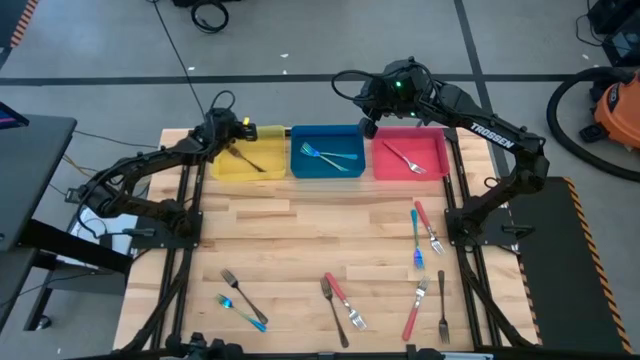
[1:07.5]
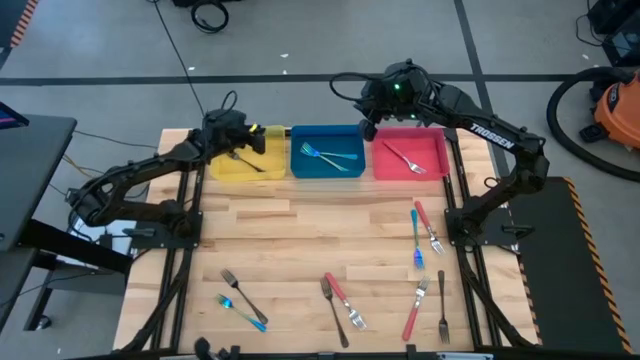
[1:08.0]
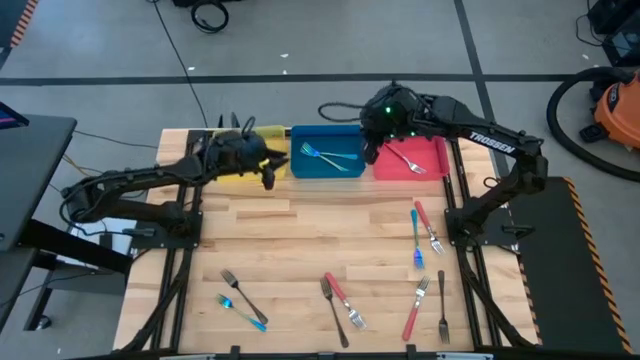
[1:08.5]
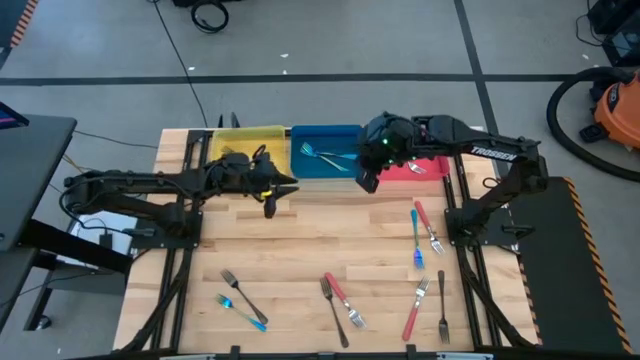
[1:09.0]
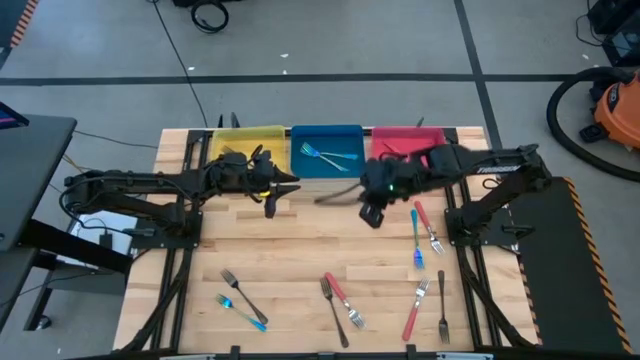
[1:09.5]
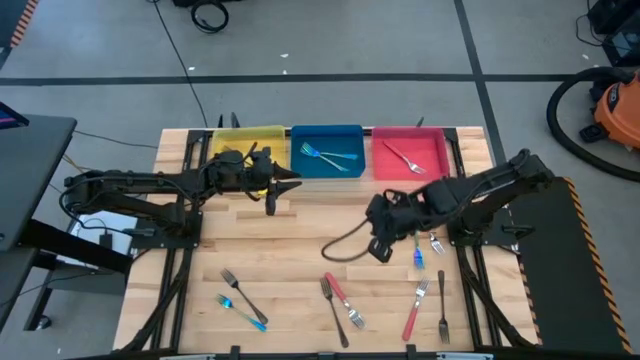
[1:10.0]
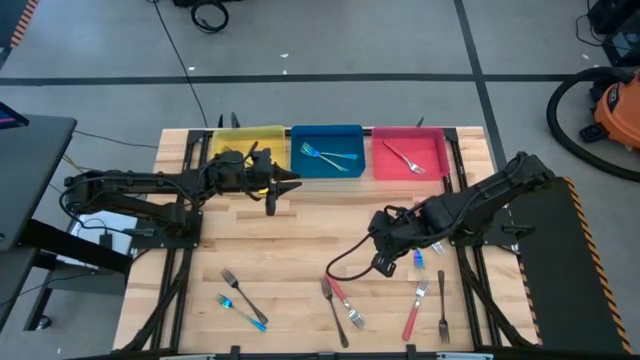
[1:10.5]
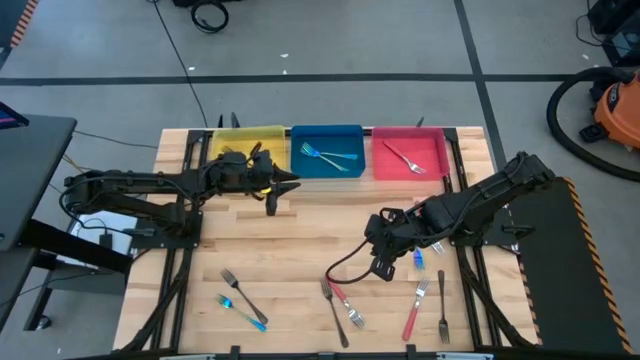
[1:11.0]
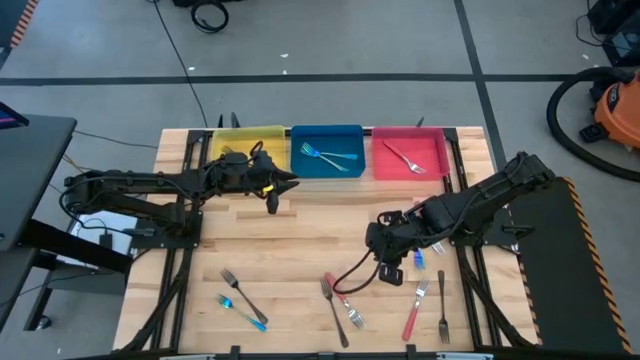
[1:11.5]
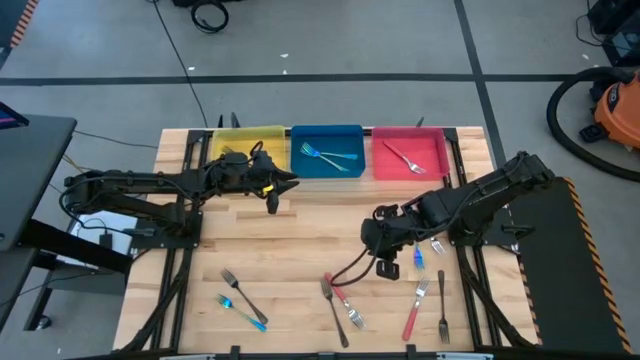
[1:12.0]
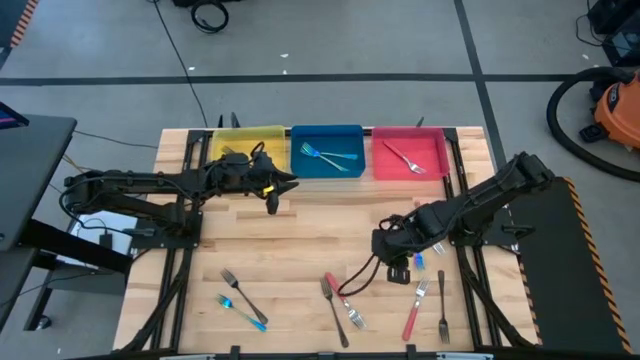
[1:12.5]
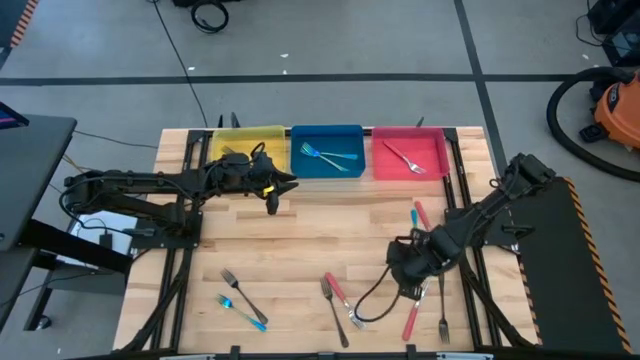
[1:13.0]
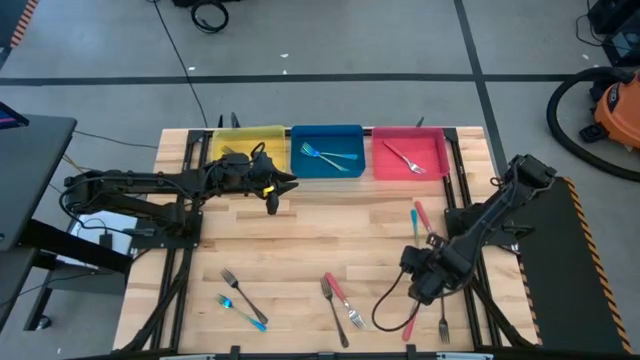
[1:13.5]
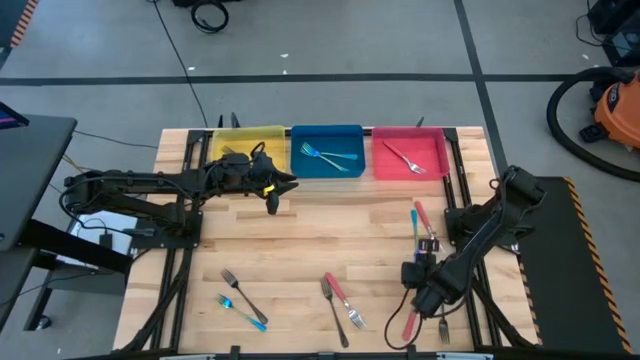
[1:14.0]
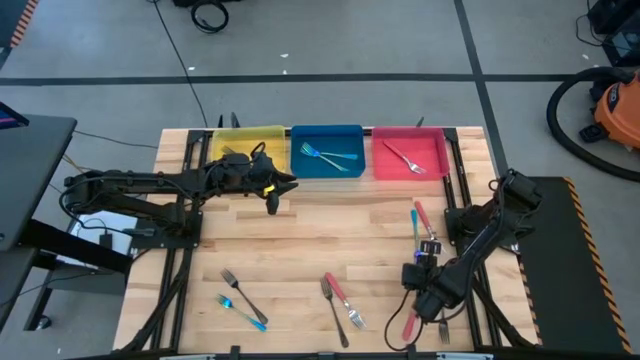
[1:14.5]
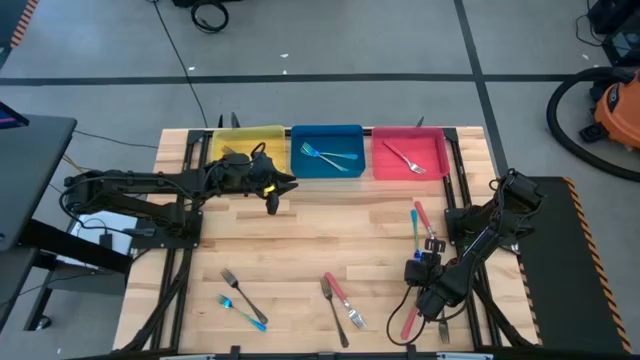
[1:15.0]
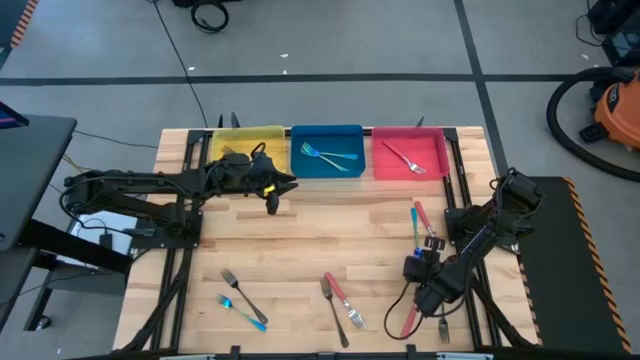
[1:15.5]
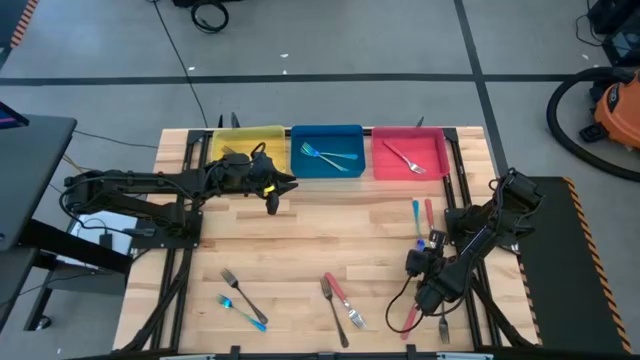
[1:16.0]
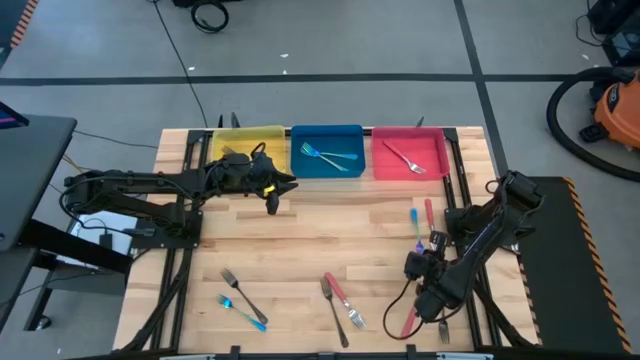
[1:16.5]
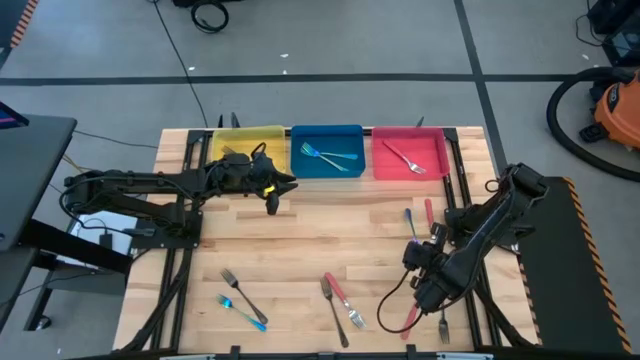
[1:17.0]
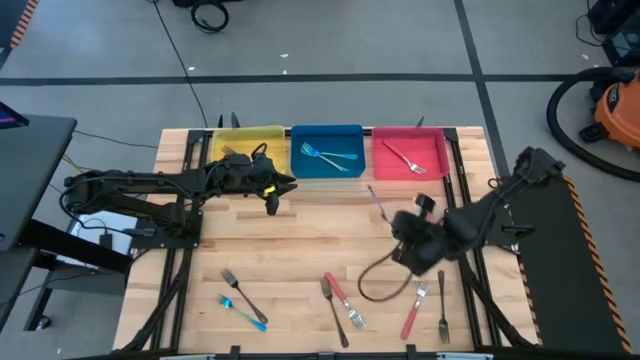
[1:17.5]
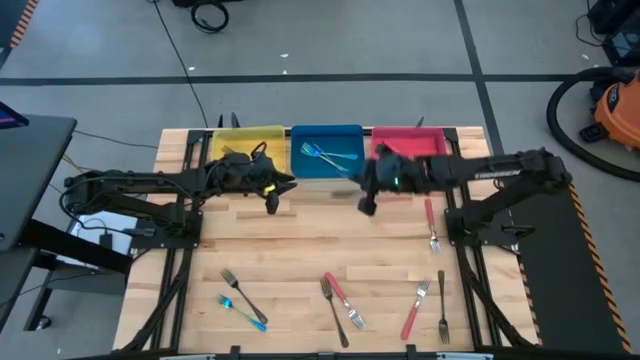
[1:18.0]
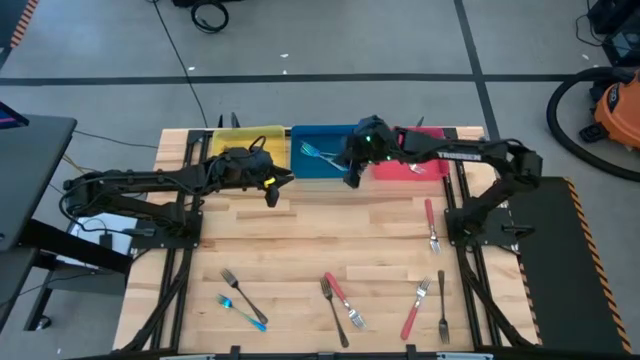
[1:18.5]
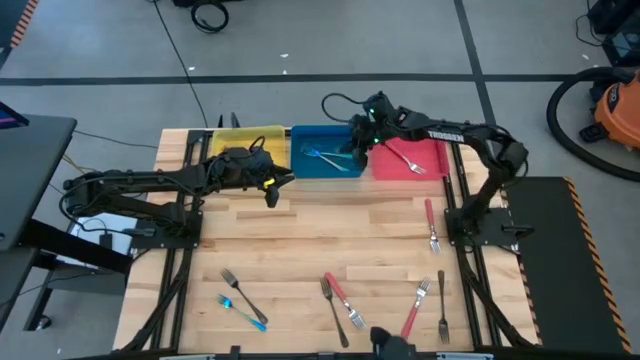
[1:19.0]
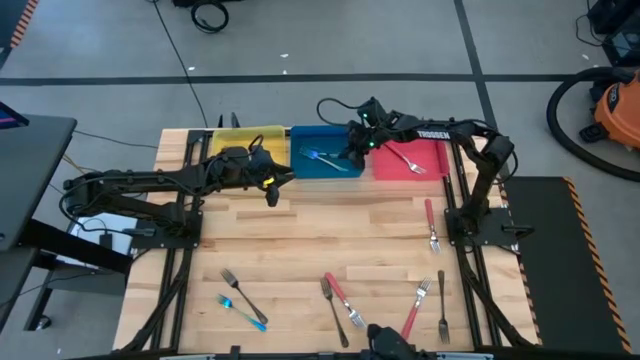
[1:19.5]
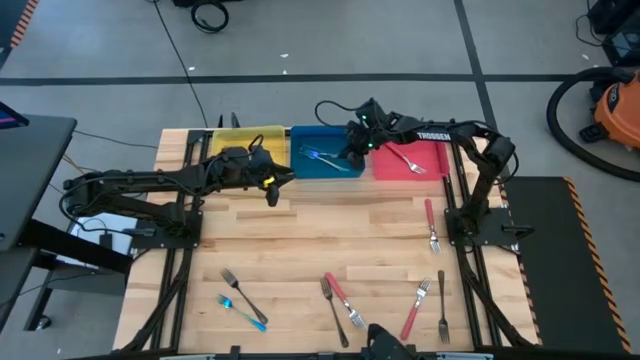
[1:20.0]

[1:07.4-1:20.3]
Task: Sort silverware by color (type)
Put the top blue fork into the blue bin

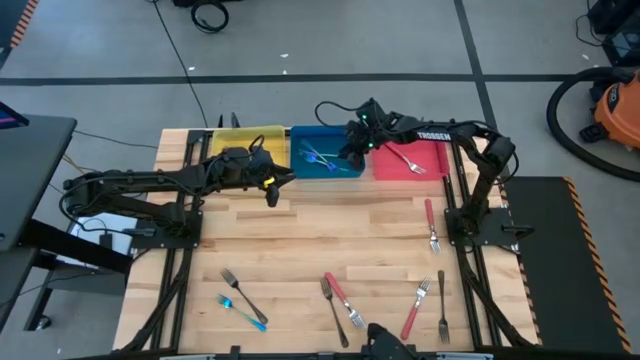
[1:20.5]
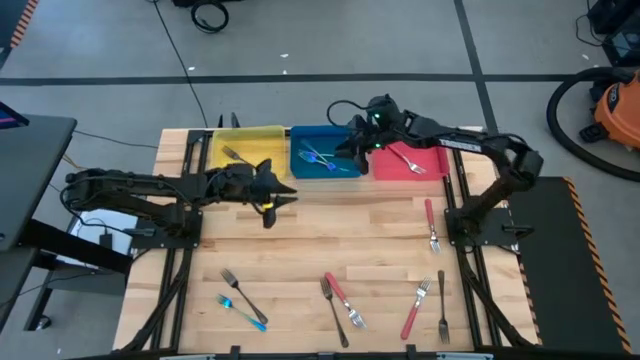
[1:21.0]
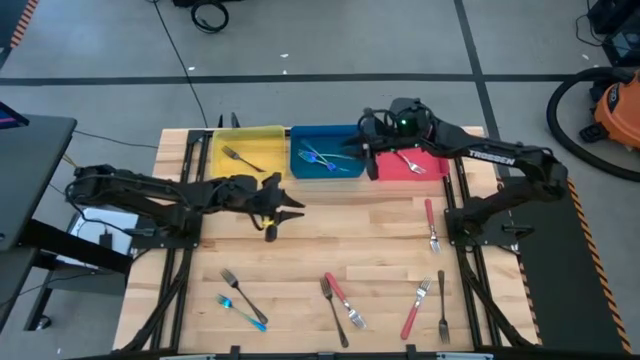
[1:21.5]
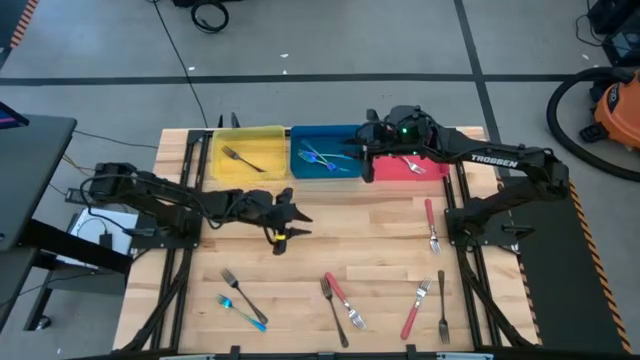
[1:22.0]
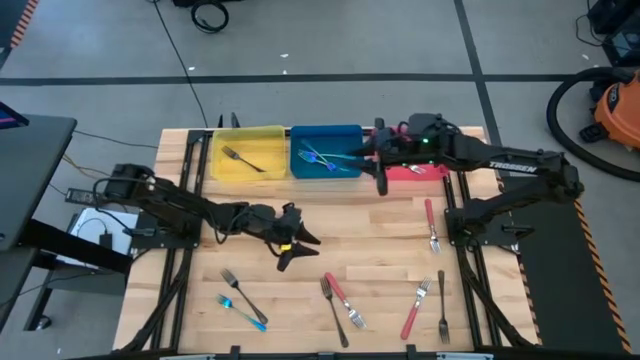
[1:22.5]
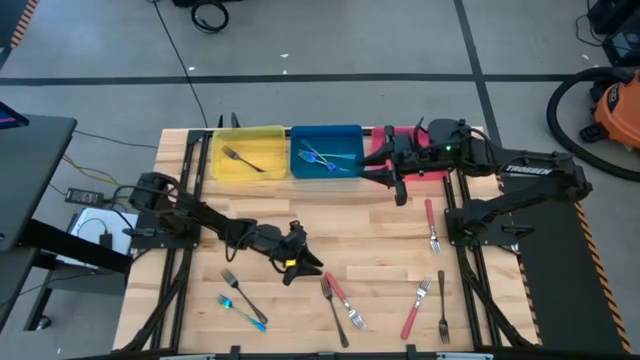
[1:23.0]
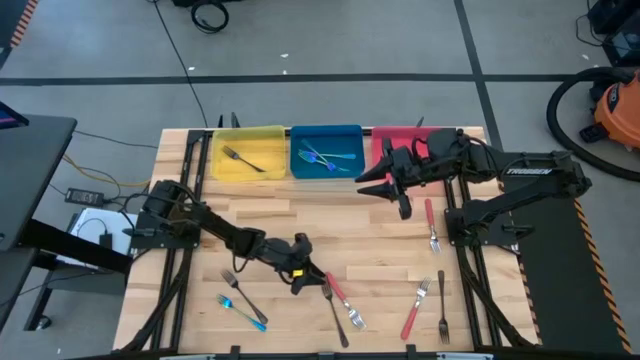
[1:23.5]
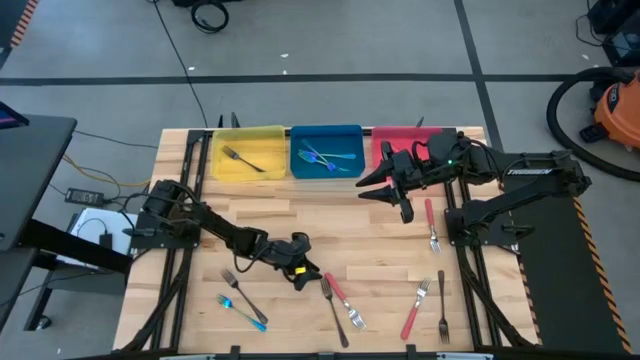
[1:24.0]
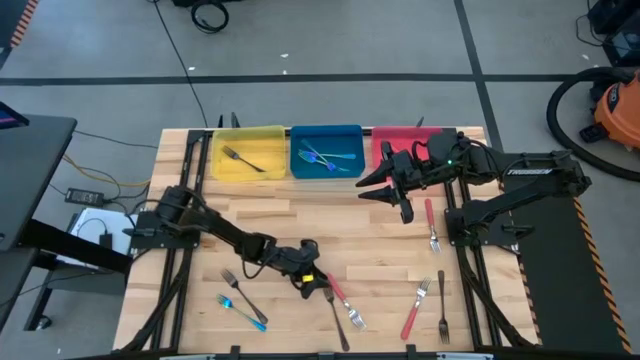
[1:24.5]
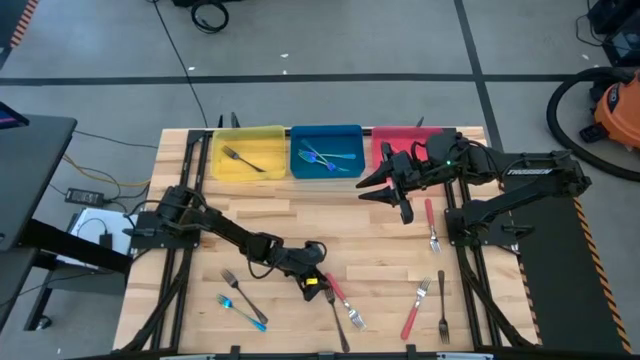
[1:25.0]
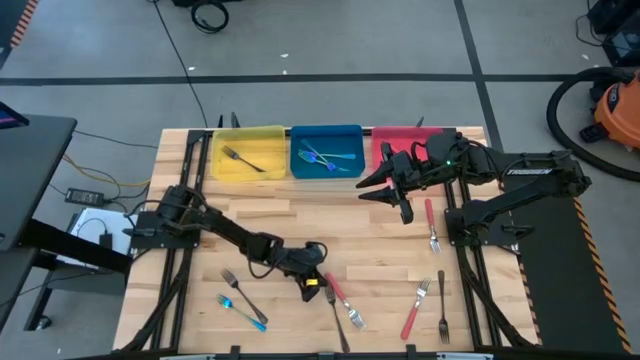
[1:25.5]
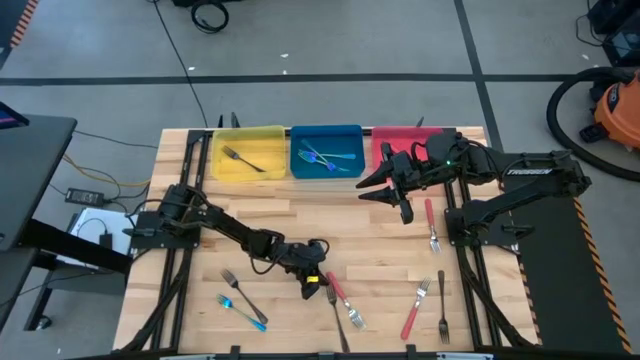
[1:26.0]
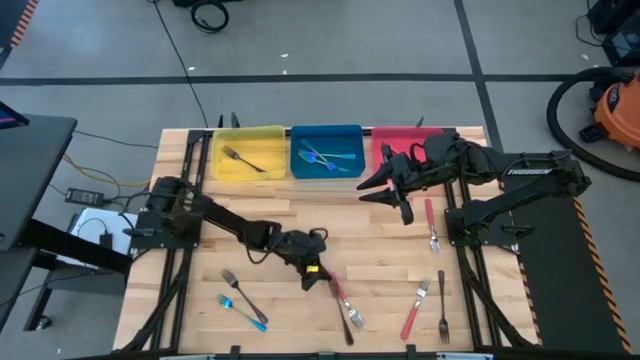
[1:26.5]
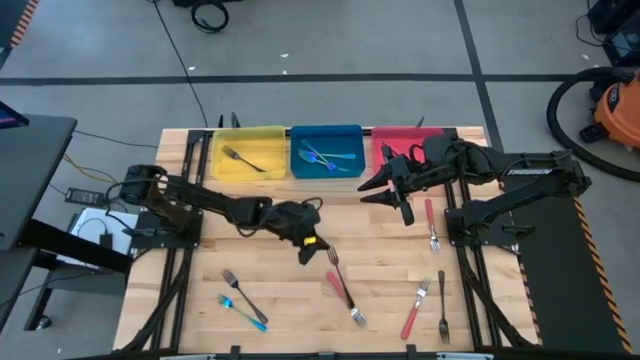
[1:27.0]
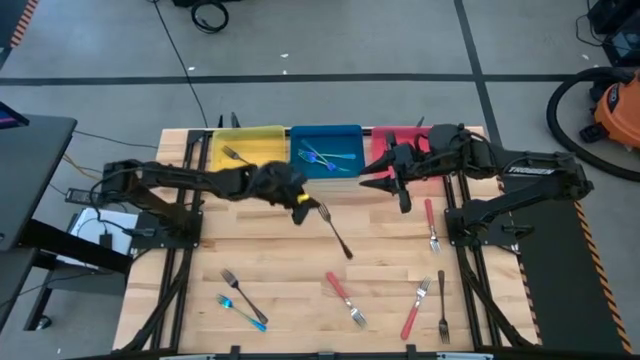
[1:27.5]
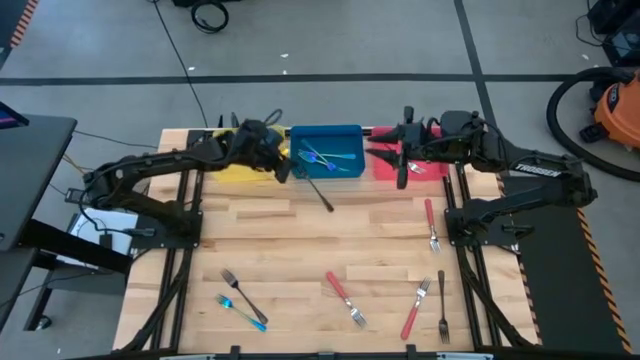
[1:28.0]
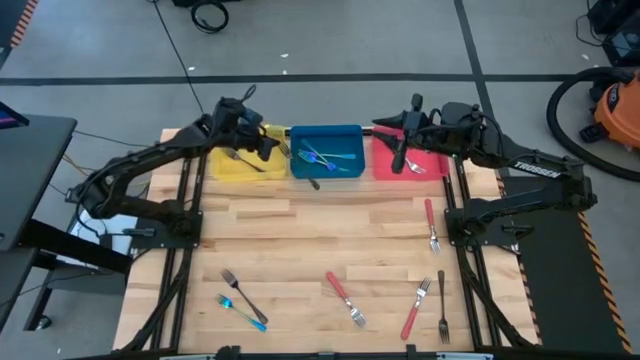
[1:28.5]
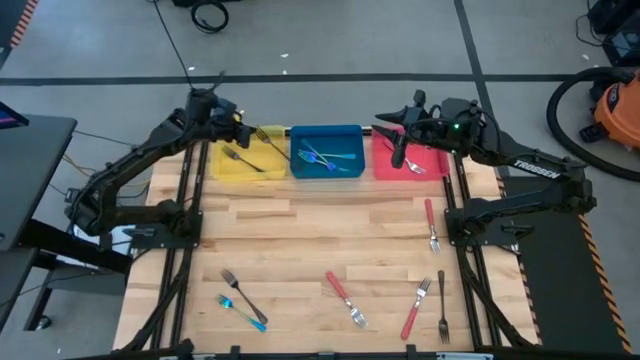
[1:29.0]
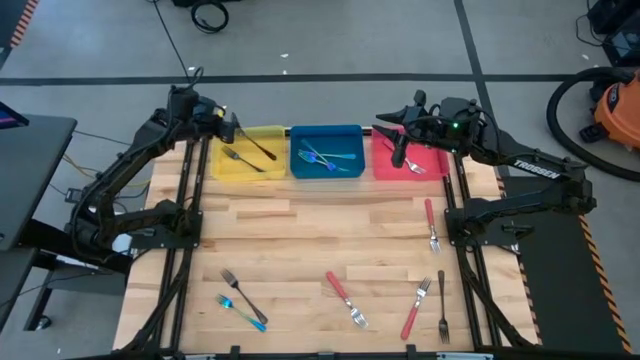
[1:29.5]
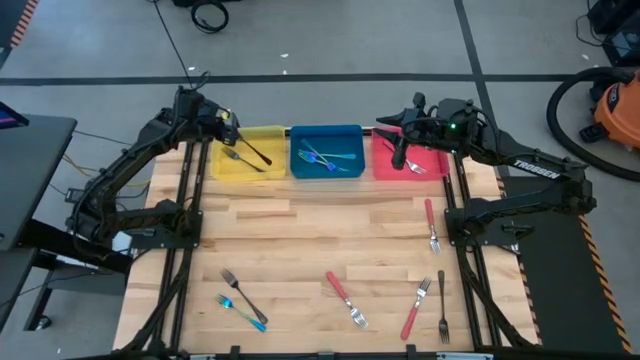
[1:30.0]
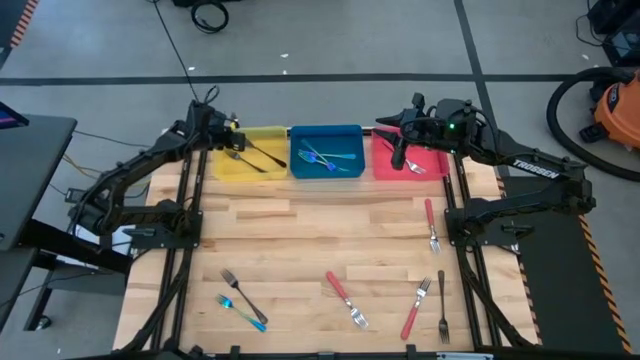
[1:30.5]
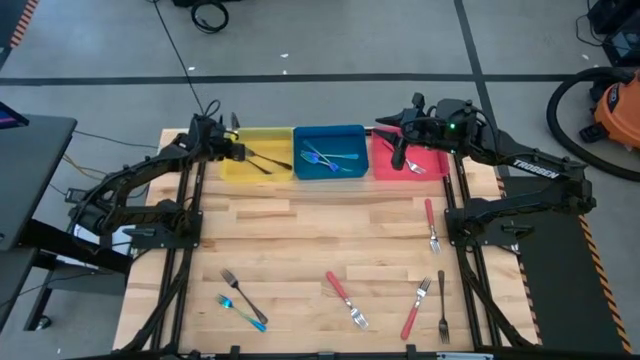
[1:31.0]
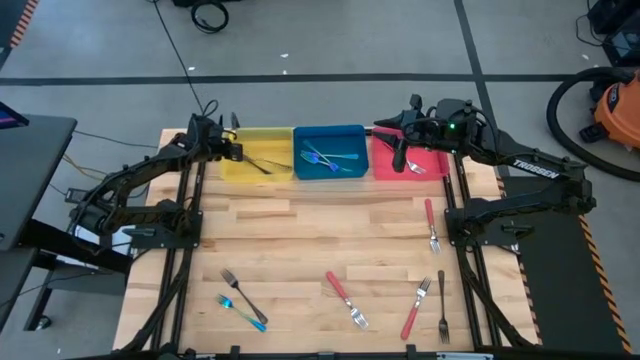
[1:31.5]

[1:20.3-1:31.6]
Put the middle black fork into the yellow bin
